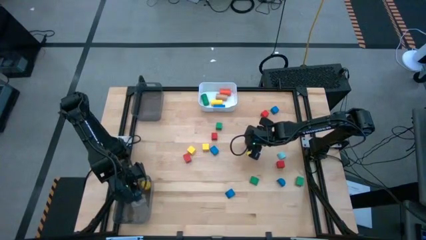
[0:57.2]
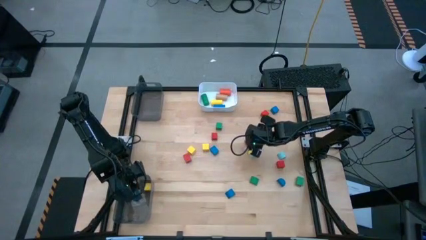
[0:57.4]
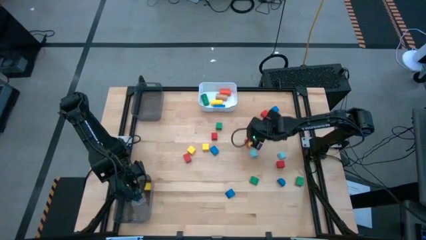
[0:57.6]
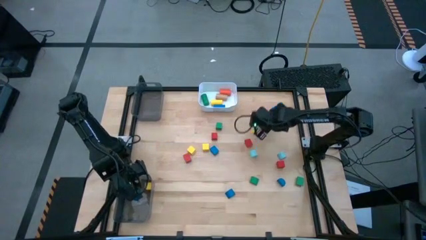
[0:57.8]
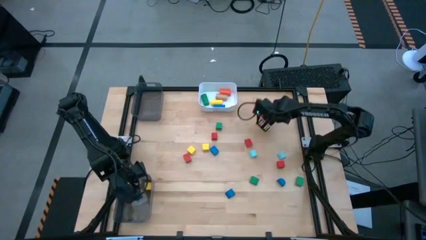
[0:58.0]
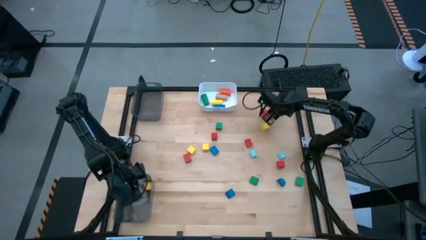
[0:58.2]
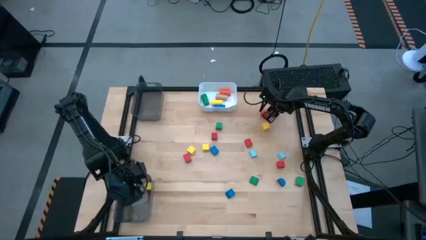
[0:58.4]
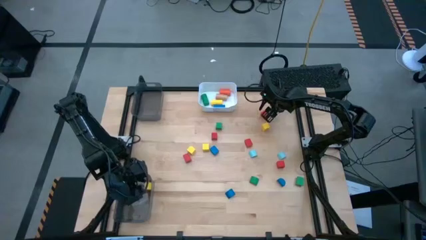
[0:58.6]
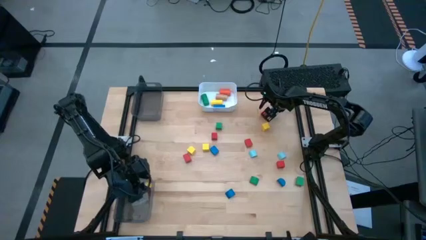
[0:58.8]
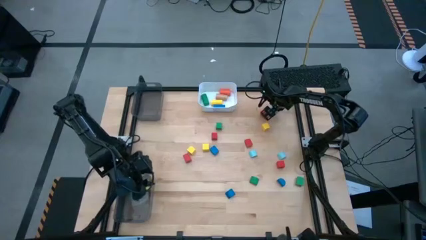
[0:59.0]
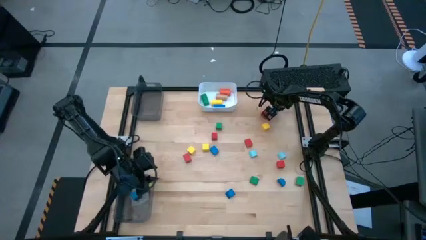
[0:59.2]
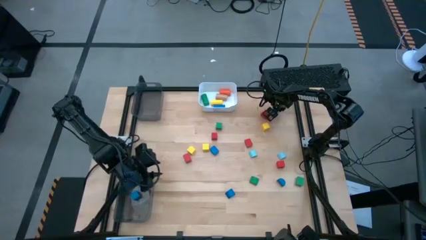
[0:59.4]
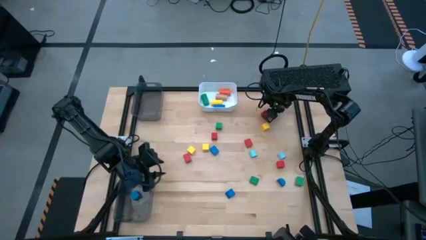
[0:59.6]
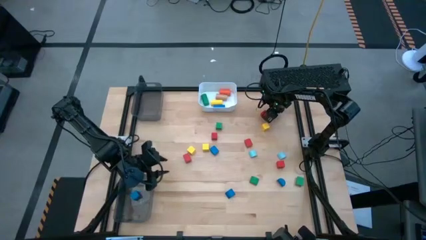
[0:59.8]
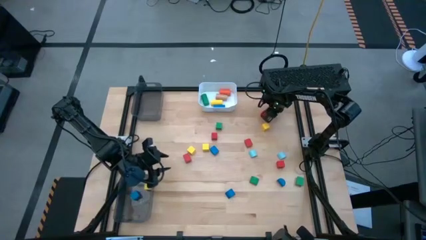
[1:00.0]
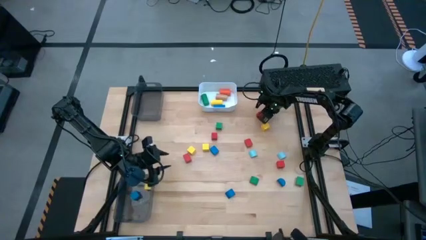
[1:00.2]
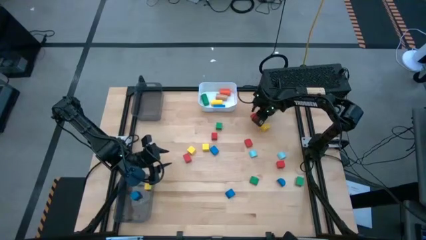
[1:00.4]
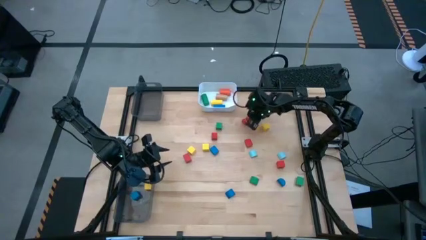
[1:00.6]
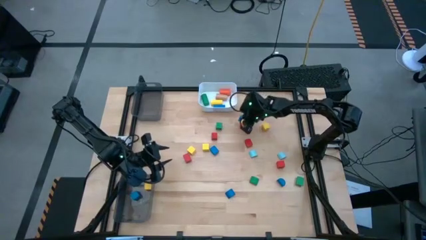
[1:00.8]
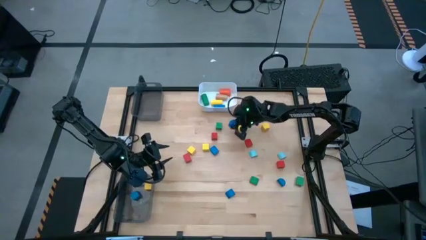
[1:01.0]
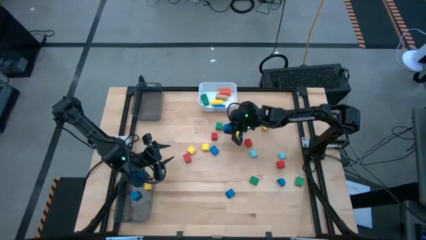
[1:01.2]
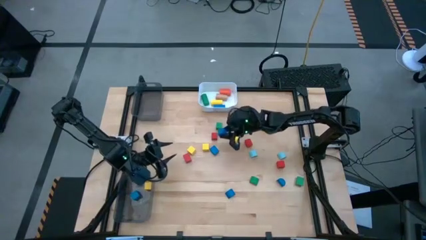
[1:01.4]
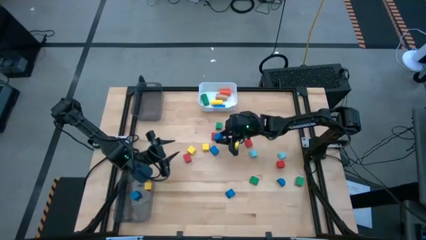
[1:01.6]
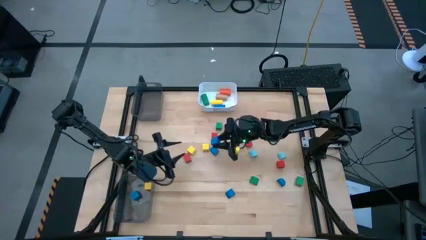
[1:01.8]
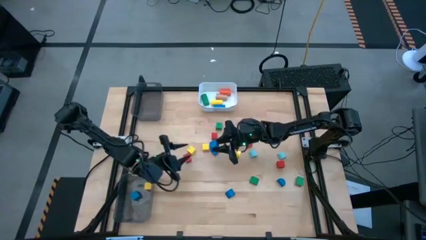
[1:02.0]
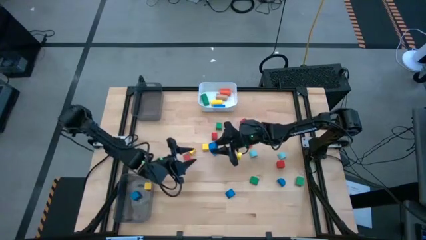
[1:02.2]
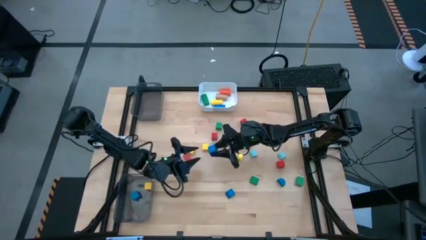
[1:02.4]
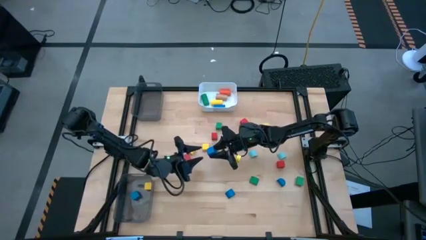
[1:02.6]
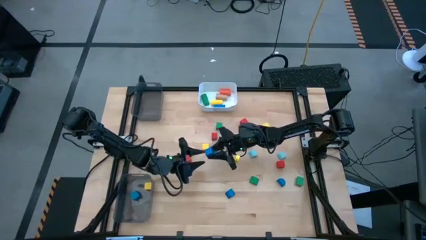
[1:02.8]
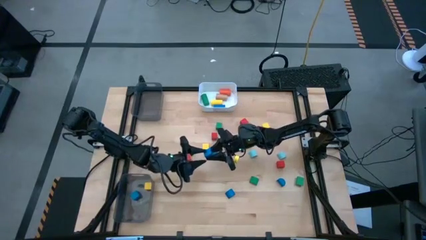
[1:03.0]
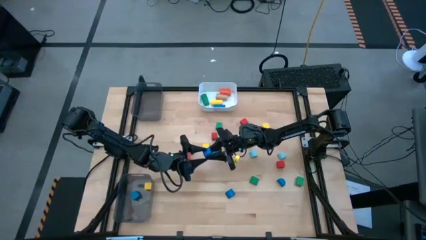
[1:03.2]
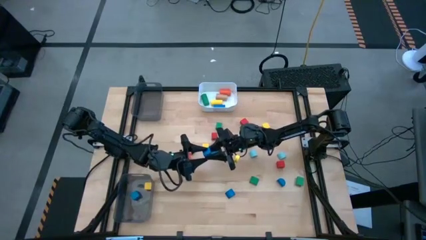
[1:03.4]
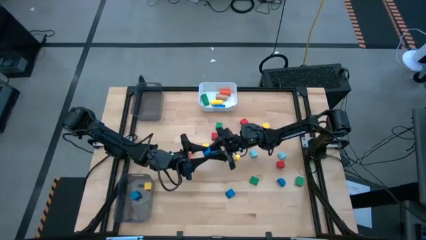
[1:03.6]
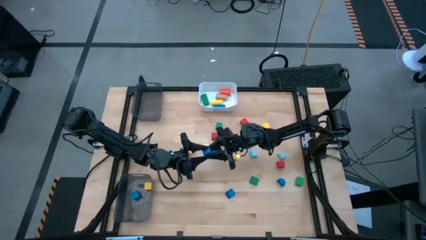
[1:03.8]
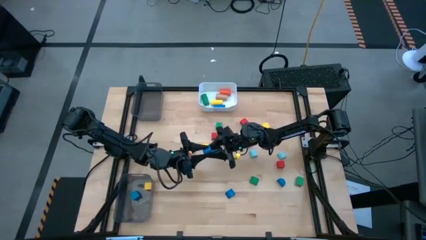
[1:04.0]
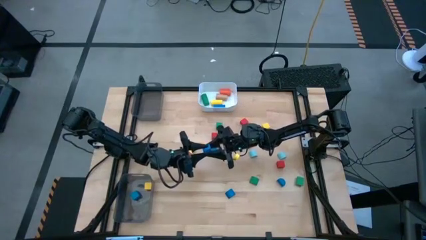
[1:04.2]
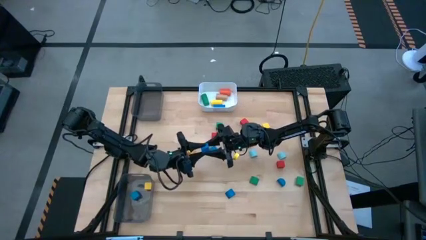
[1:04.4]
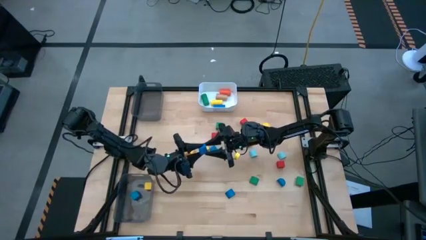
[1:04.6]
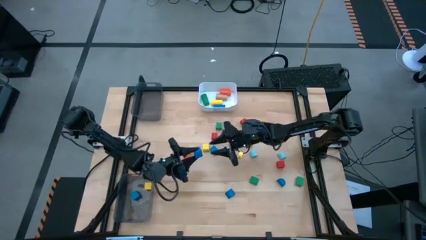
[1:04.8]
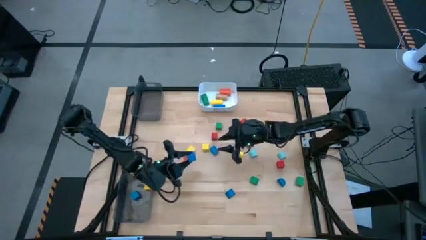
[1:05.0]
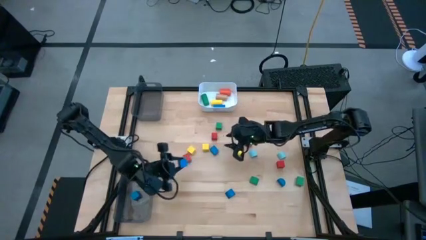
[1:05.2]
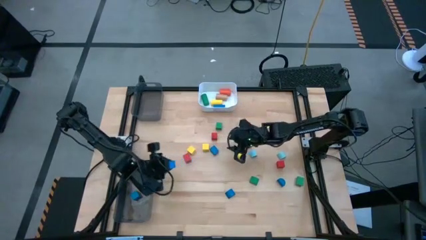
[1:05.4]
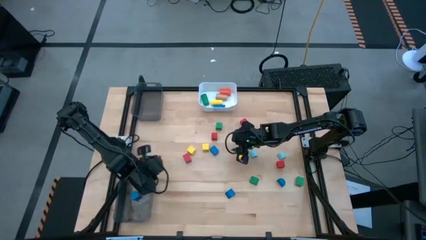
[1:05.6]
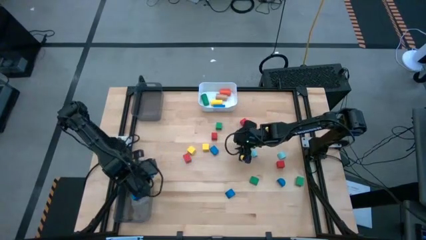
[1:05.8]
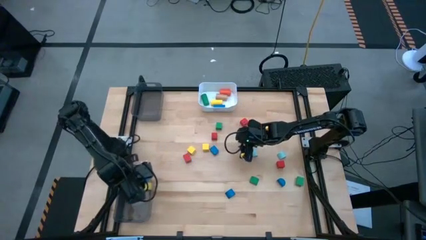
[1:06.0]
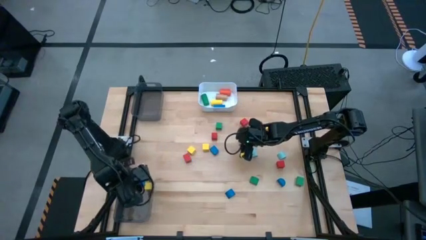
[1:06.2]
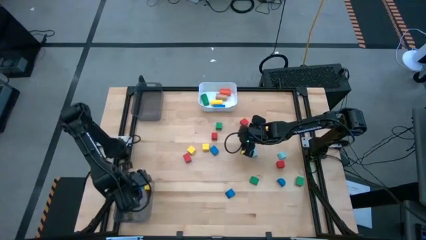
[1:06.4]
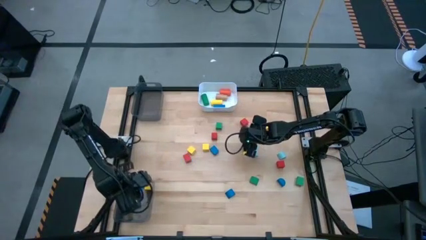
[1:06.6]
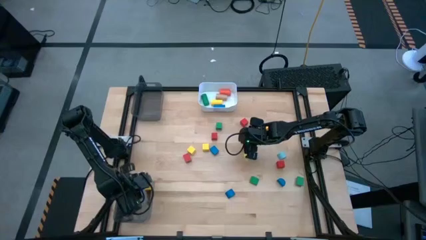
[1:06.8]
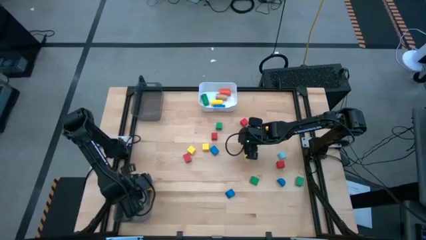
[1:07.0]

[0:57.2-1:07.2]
Task: Sort blocks by size
Put the blue square block into the bottom black bin

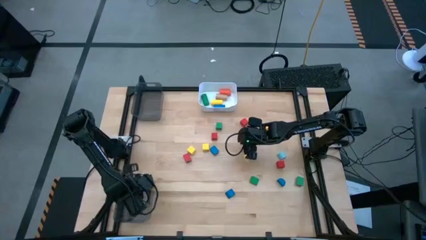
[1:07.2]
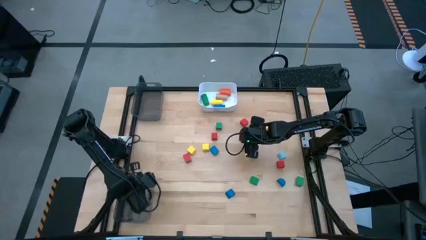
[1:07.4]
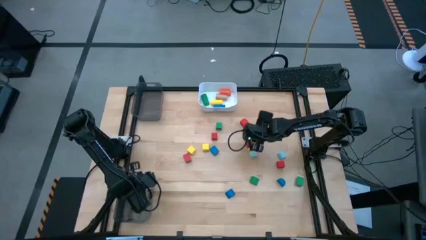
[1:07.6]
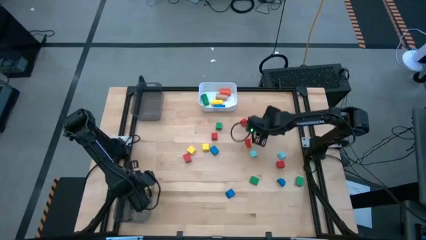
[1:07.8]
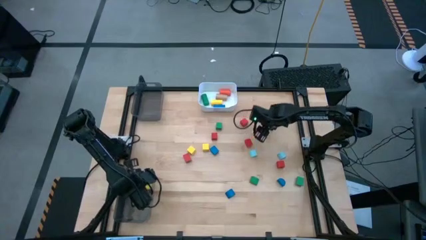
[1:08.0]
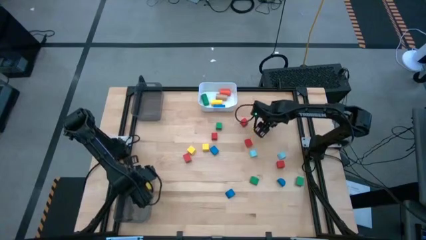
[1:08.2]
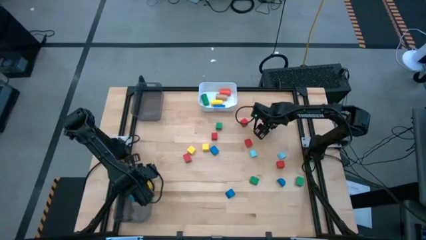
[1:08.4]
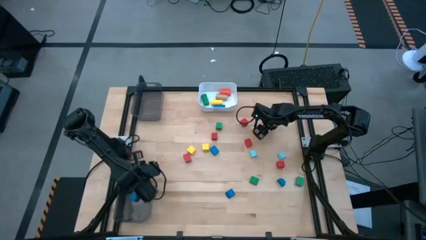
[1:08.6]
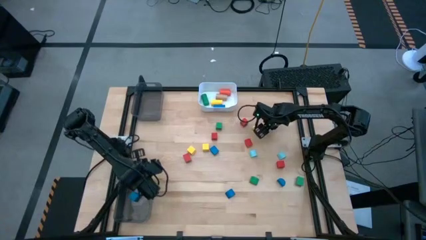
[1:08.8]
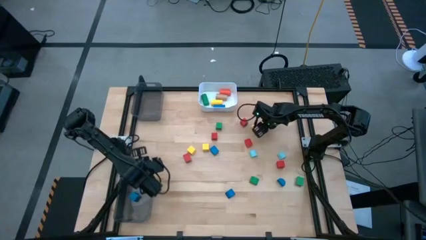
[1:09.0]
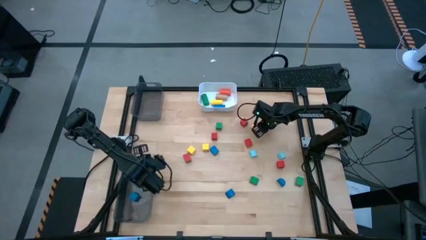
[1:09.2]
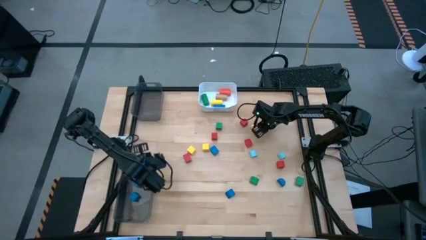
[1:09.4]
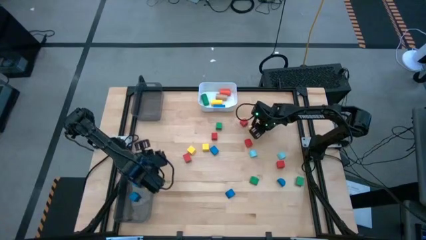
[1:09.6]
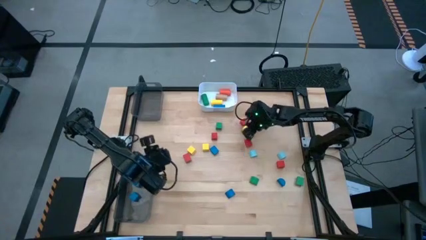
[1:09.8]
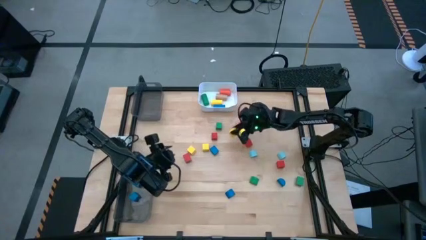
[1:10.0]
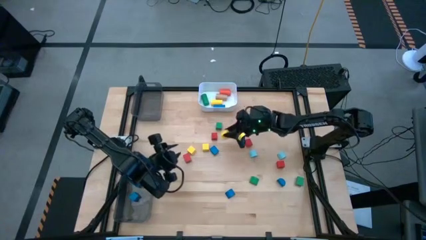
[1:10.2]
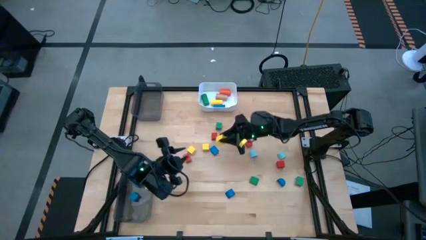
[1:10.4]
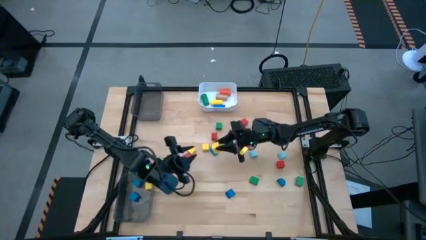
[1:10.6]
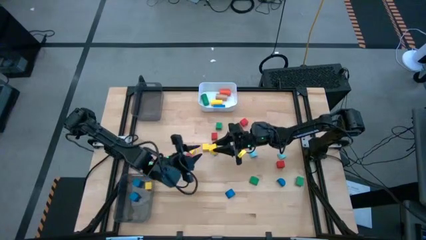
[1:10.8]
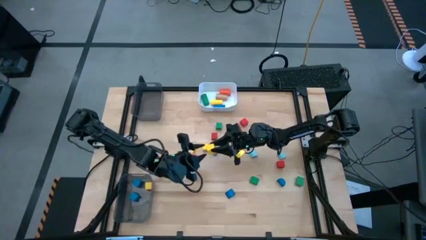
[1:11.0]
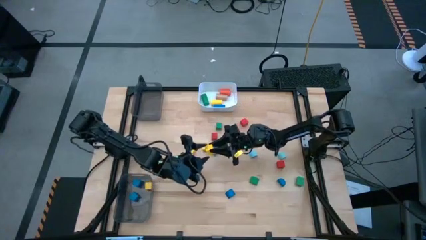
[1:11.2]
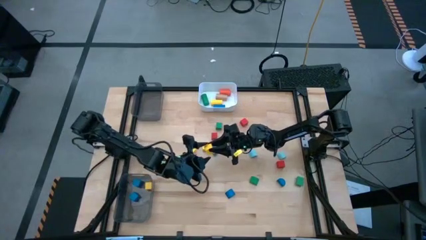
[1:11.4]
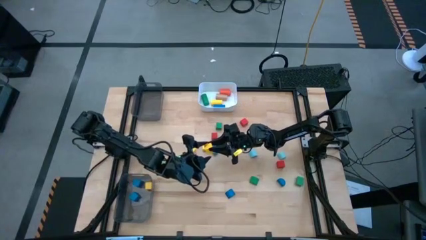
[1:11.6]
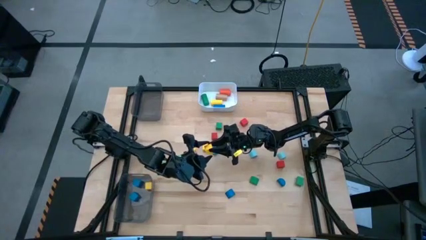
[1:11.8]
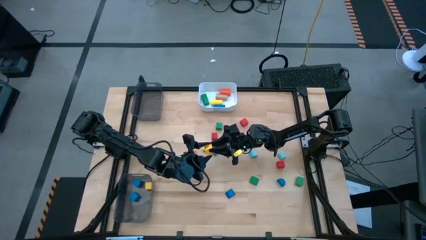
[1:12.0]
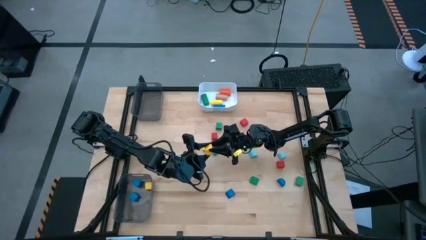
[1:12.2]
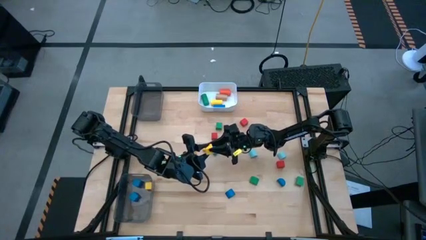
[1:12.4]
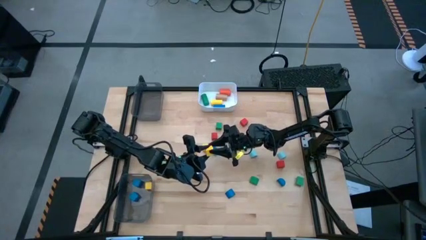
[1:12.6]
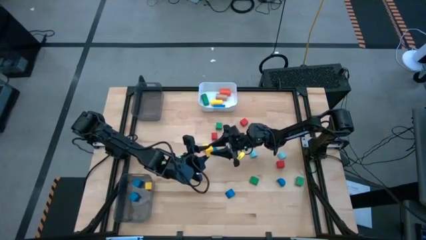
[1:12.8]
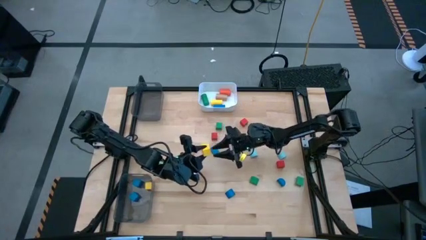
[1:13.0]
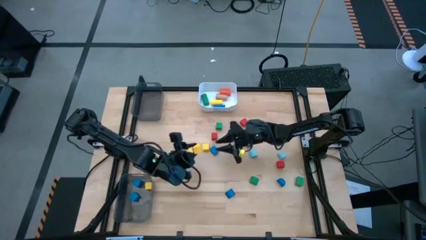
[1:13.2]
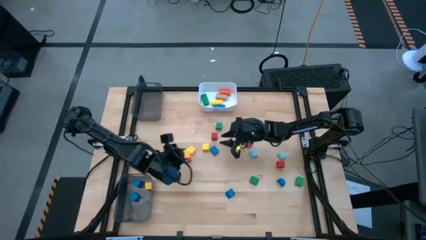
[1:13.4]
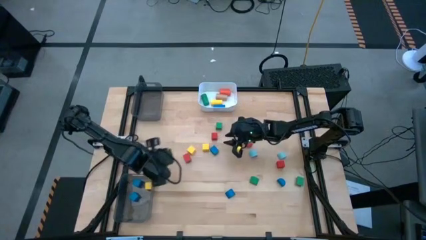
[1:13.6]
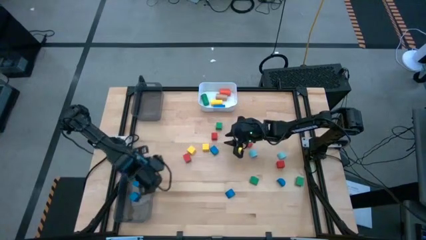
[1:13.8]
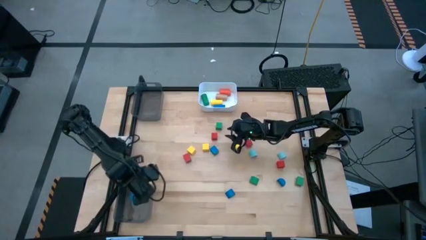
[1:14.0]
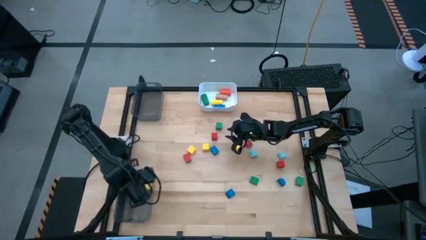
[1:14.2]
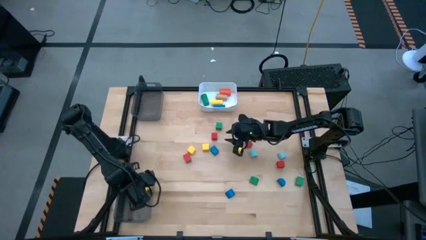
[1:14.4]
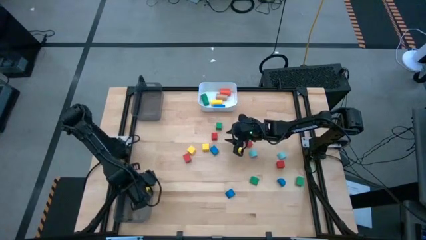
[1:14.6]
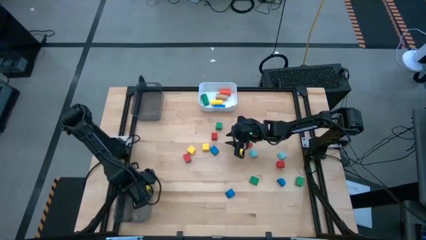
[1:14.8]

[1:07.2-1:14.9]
Put the yellow square block into the bottom black bin
